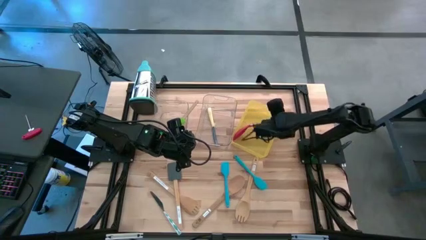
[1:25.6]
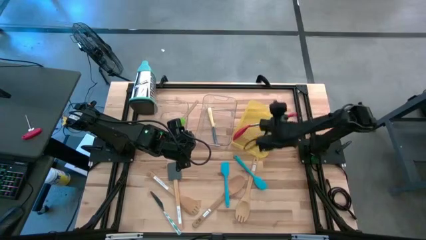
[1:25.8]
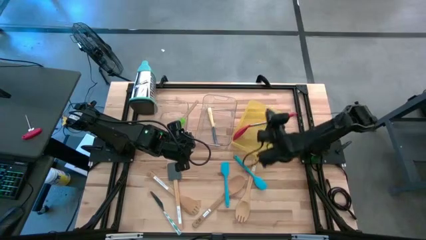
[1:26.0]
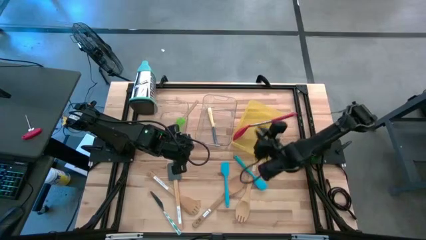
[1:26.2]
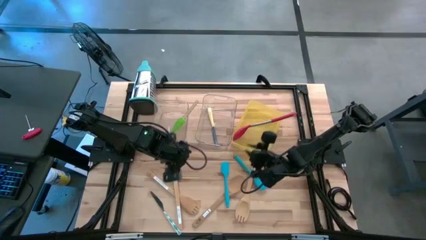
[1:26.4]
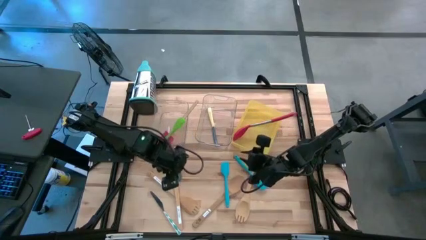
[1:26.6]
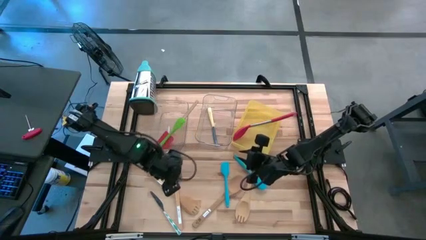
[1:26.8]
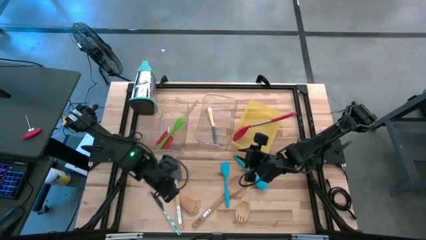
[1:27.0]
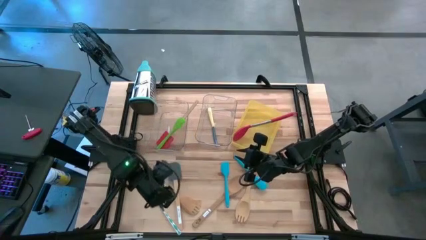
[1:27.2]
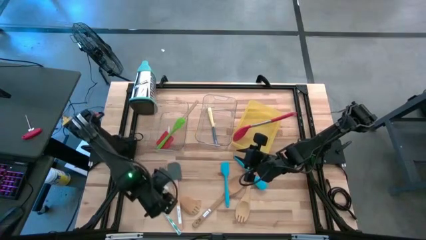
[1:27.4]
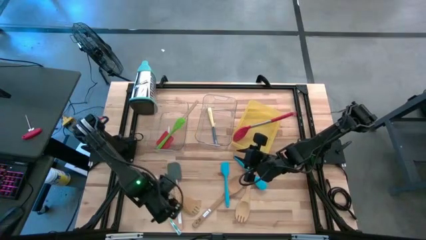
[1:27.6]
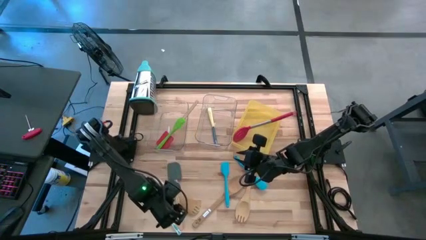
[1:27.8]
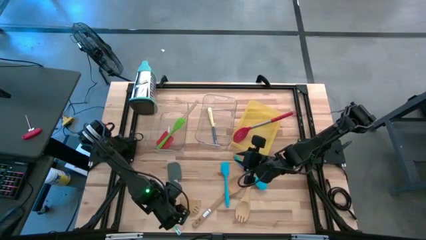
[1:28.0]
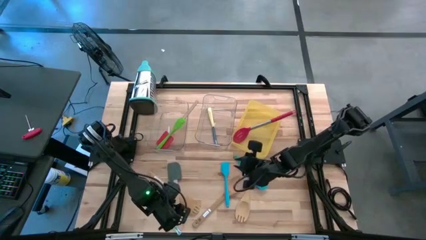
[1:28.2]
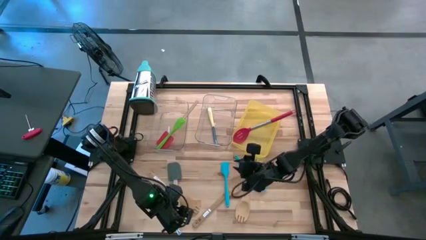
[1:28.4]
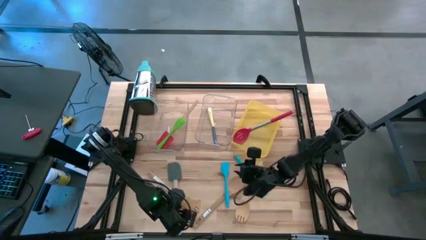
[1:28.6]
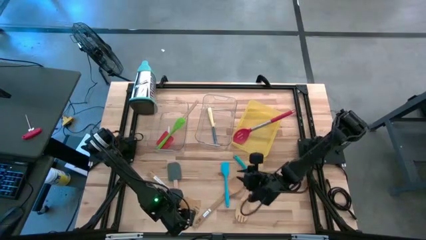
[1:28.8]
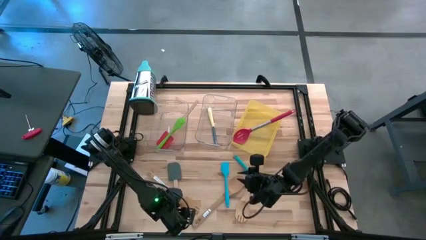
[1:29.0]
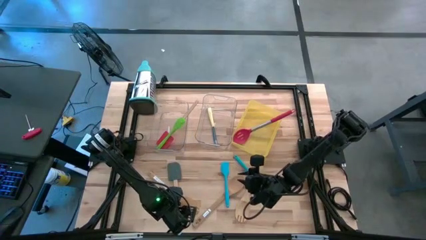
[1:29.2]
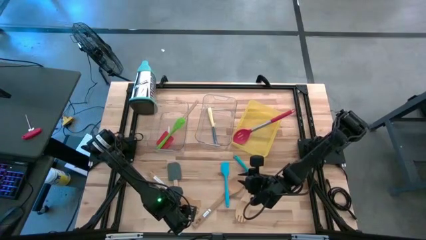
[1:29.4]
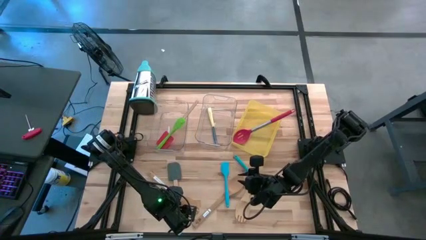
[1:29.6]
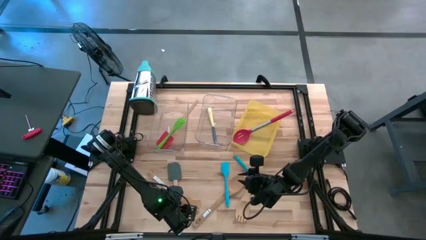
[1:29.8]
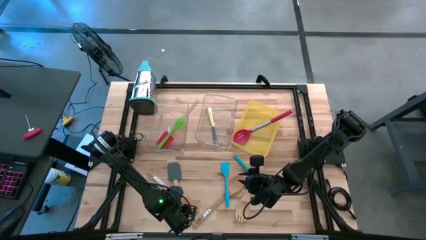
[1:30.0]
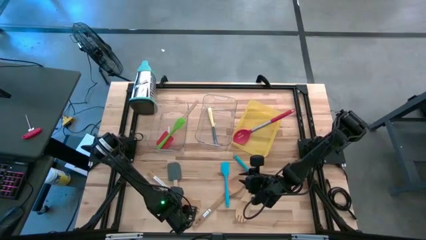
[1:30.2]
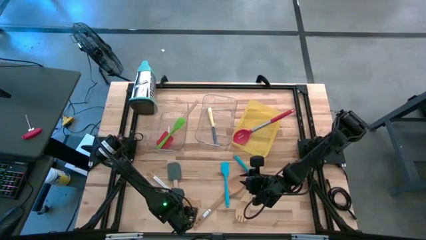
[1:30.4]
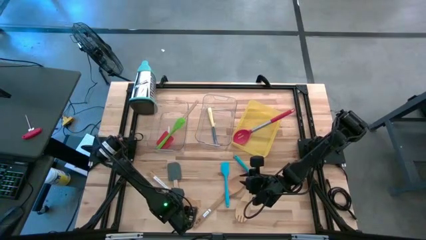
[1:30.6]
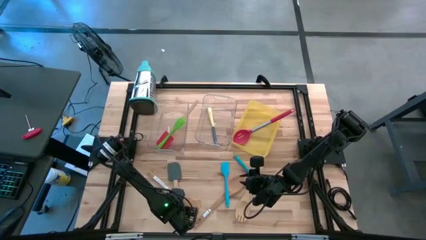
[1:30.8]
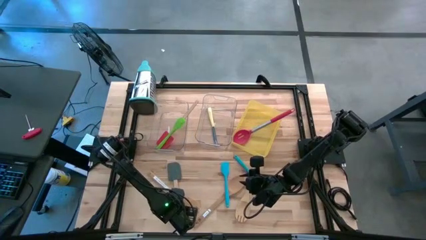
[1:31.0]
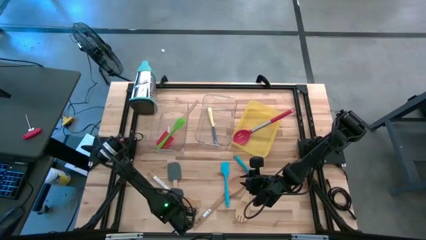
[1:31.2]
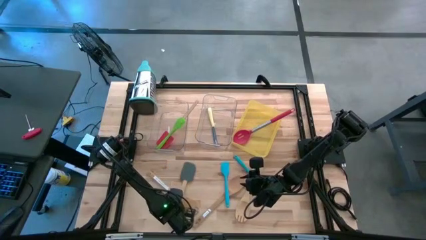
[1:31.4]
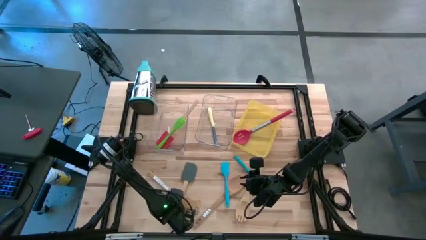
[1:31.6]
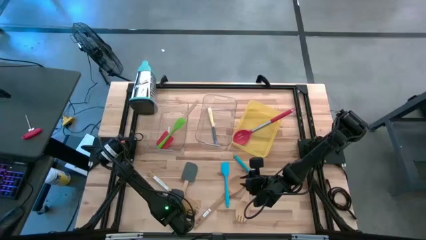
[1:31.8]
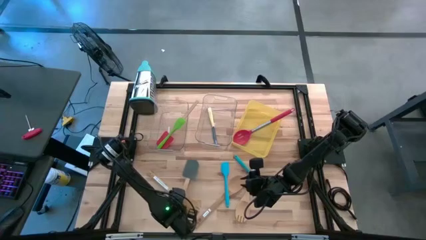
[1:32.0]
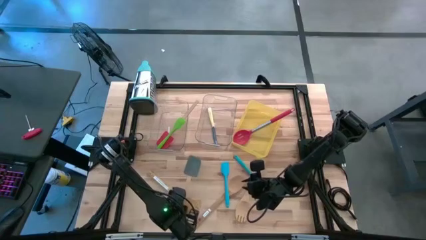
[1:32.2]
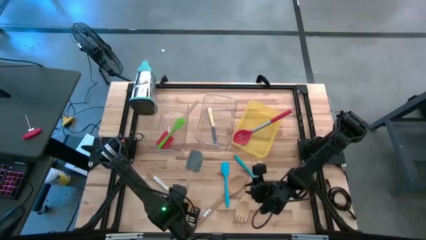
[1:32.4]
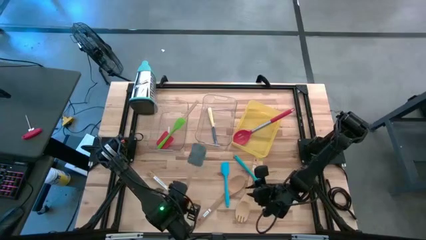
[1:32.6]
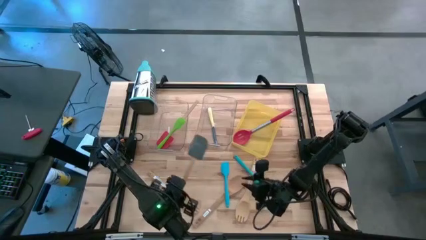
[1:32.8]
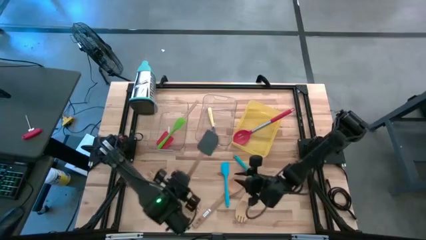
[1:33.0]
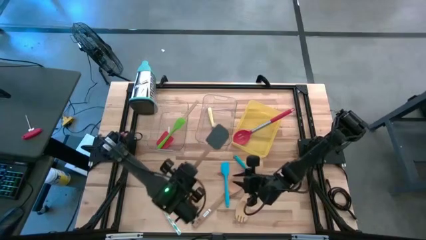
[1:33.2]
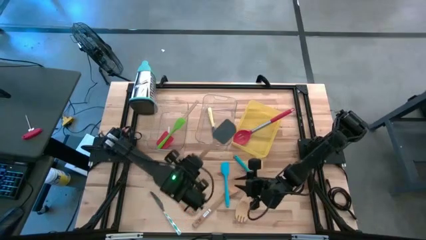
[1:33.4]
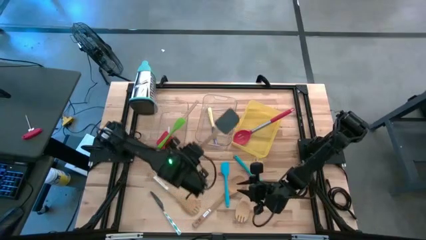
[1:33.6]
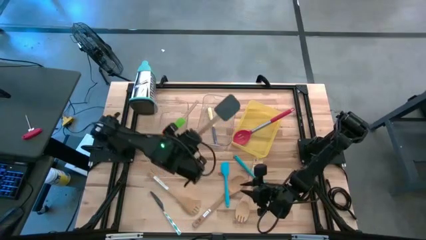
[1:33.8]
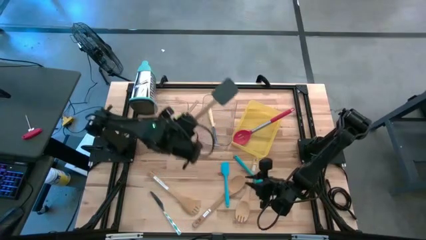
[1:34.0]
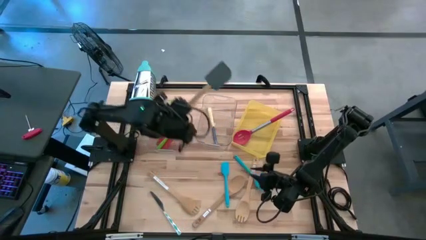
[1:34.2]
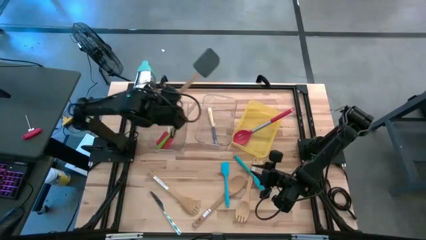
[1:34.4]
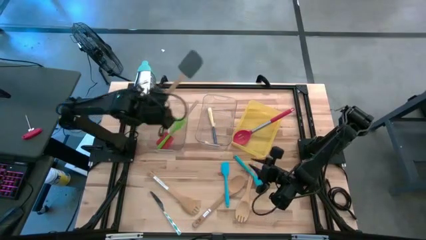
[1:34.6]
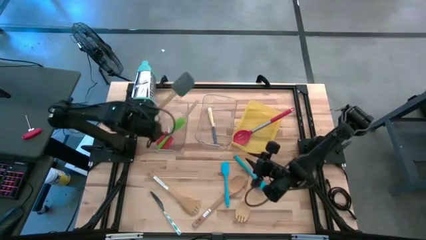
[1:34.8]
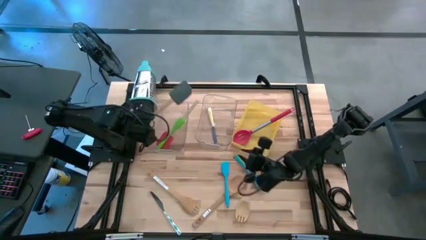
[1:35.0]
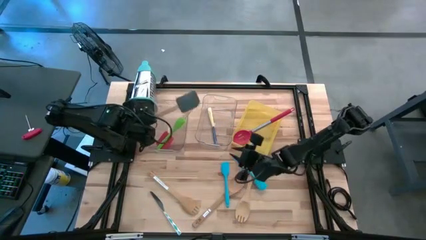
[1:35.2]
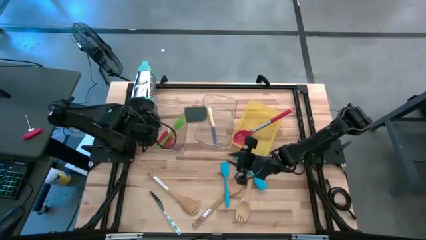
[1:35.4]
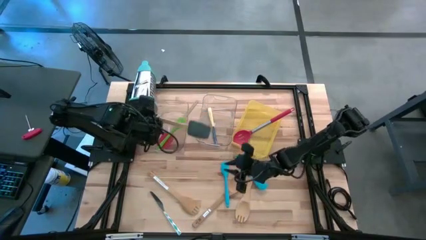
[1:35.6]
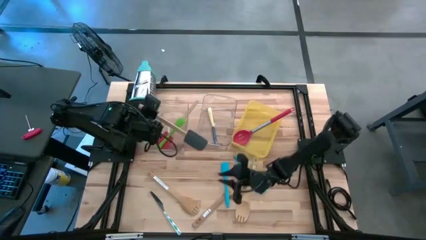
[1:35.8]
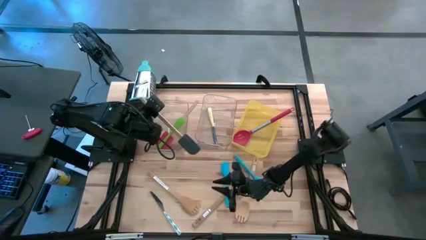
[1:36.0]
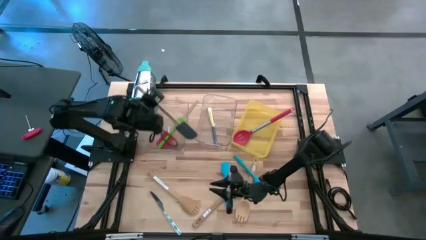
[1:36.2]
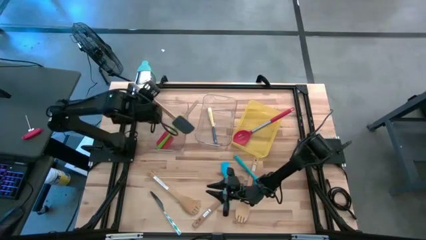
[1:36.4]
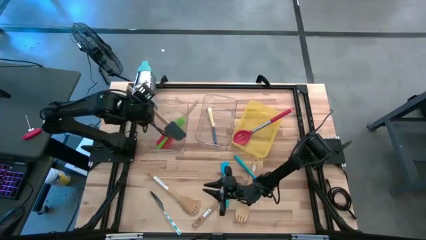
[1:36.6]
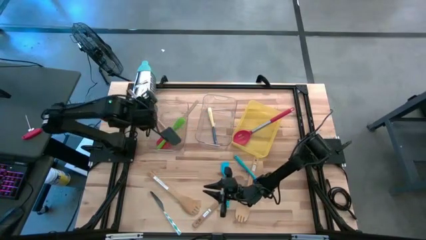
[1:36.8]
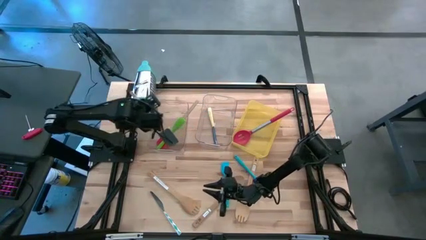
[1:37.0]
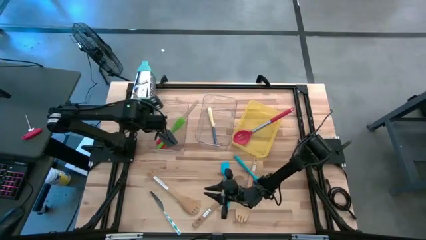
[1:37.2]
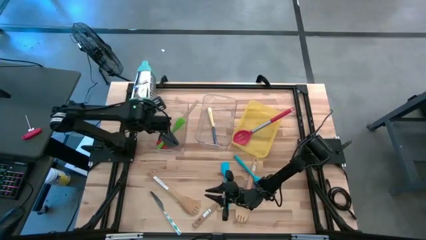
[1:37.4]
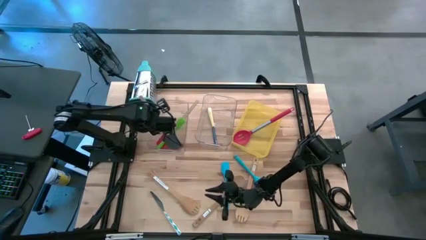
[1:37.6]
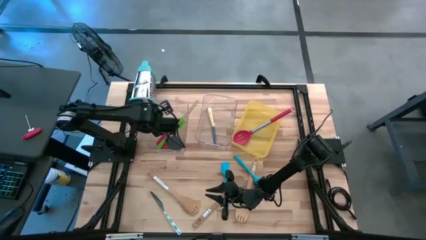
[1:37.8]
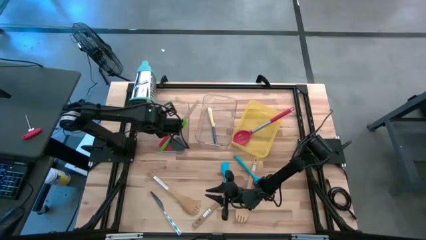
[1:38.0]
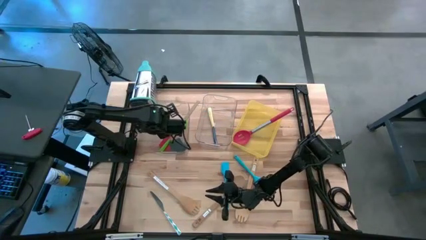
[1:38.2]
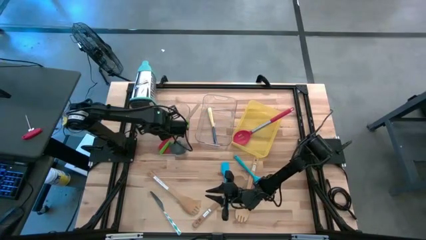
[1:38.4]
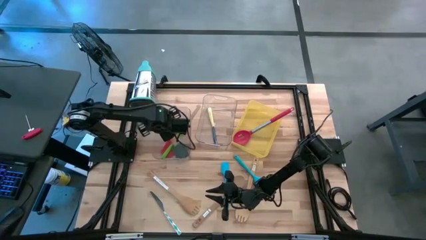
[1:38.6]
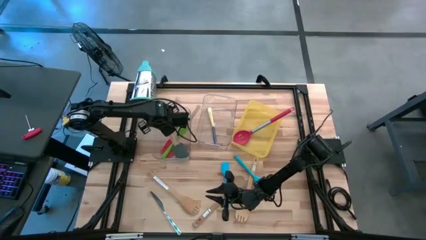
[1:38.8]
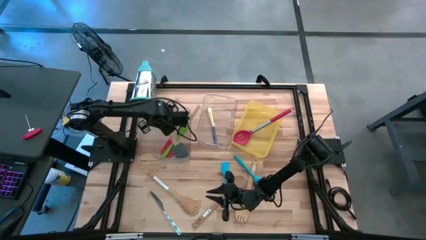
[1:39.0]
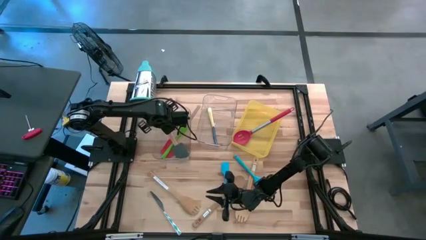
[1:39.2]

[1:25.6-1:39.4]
Task: Pick & Place Kitchen Items
Put the gray spatula into the left transparent bin
